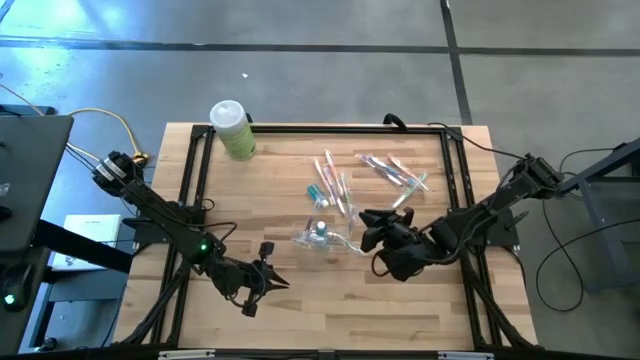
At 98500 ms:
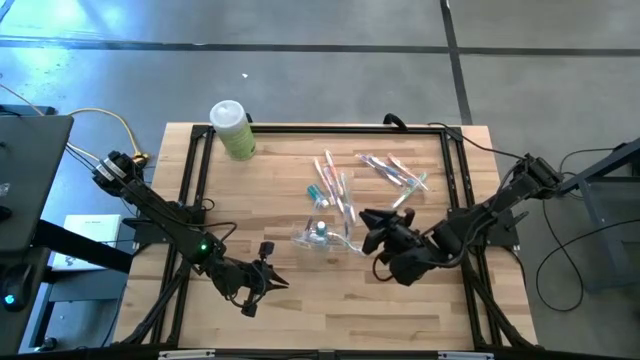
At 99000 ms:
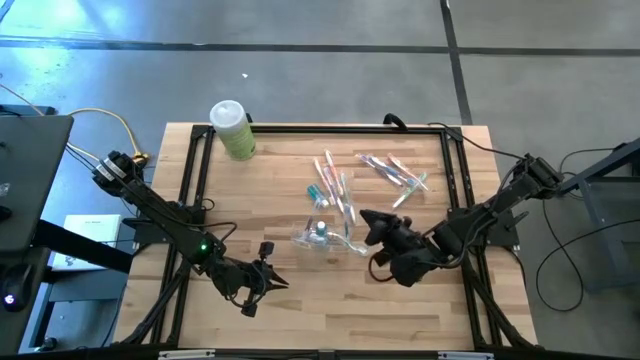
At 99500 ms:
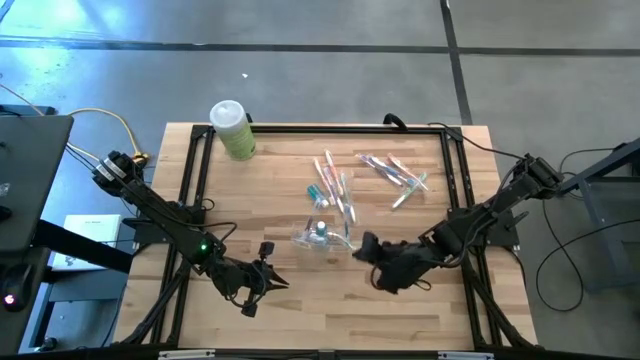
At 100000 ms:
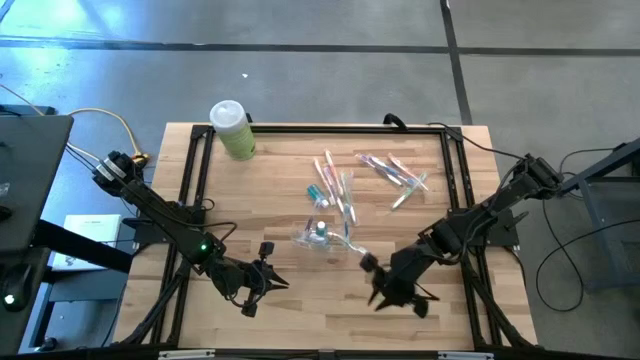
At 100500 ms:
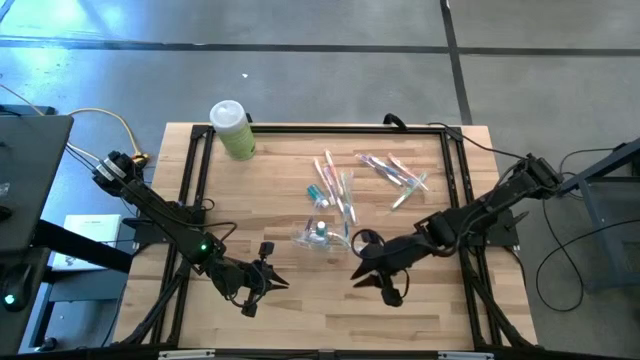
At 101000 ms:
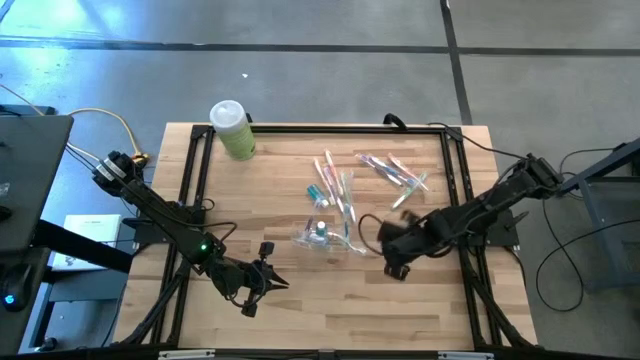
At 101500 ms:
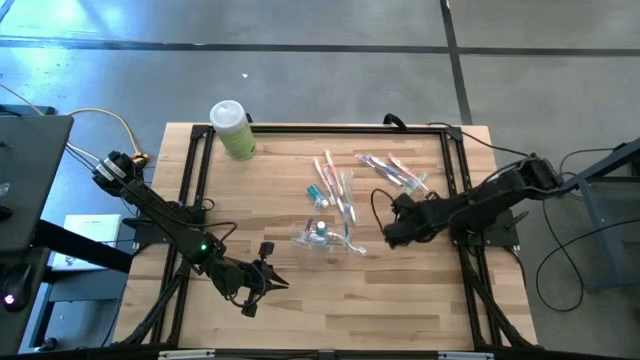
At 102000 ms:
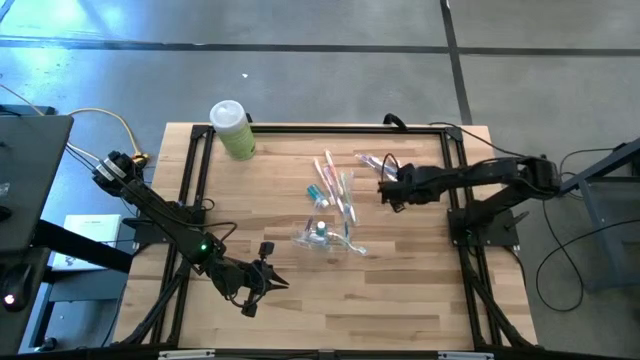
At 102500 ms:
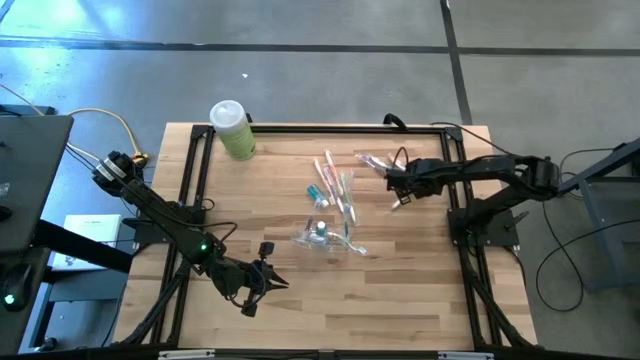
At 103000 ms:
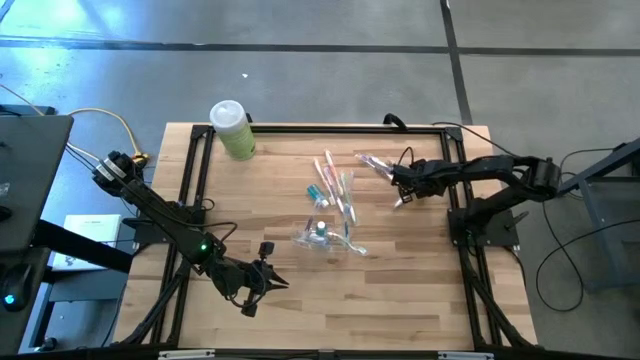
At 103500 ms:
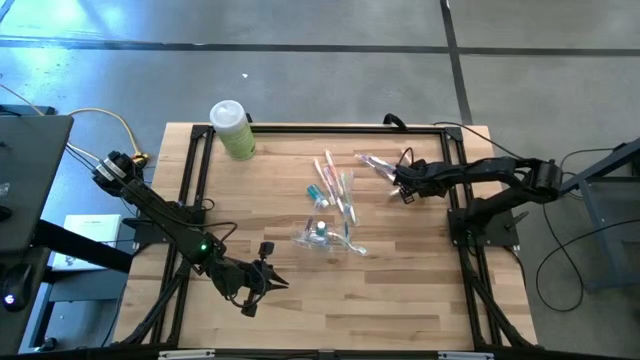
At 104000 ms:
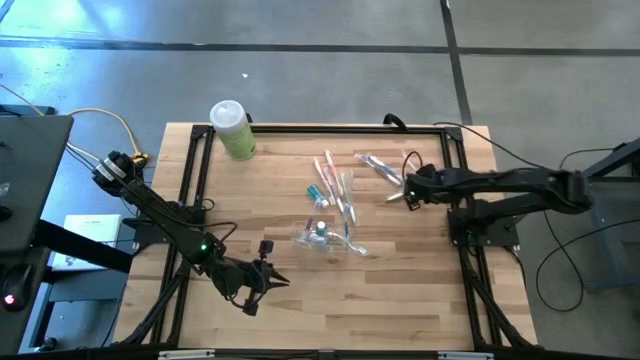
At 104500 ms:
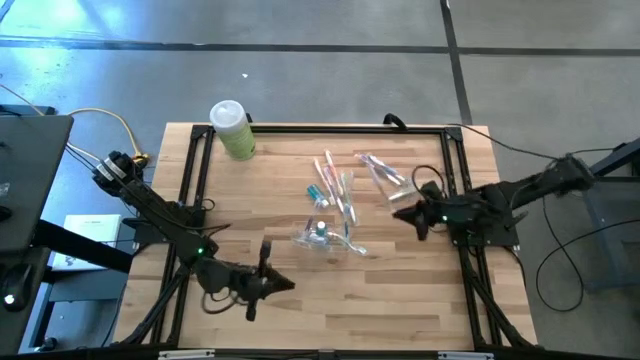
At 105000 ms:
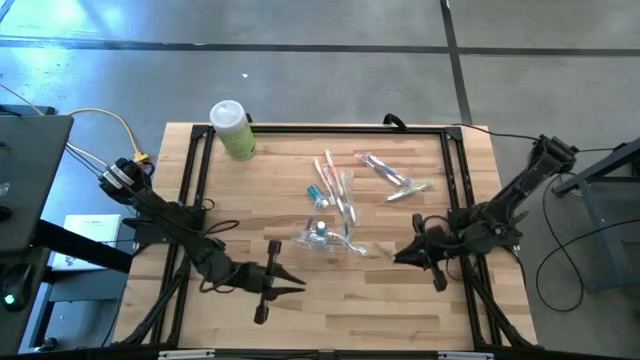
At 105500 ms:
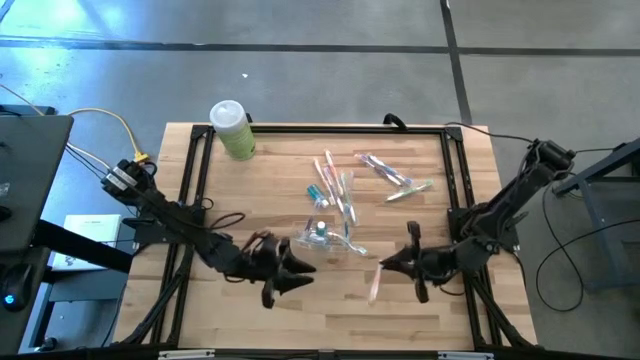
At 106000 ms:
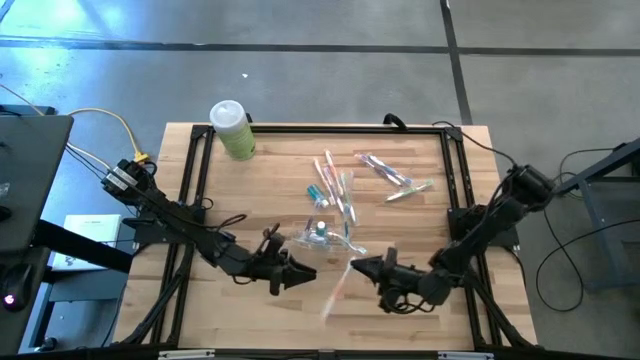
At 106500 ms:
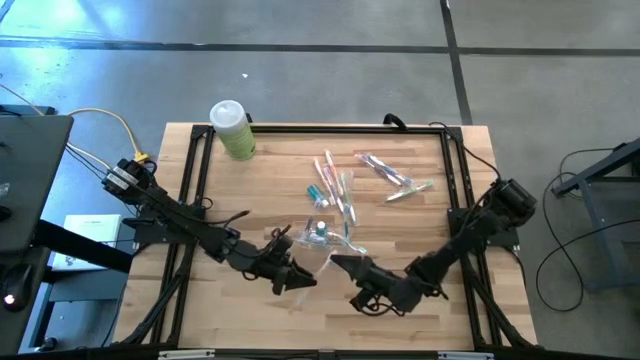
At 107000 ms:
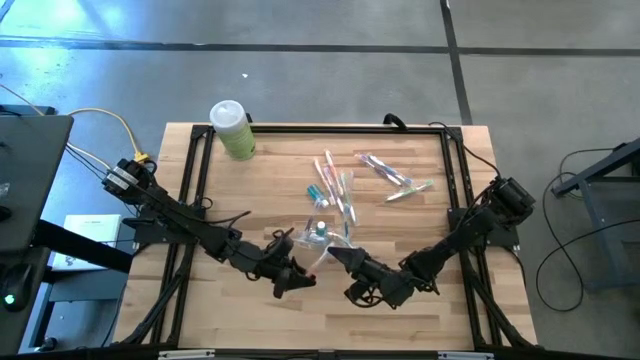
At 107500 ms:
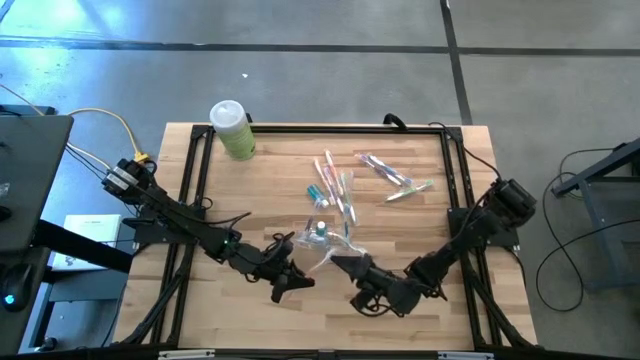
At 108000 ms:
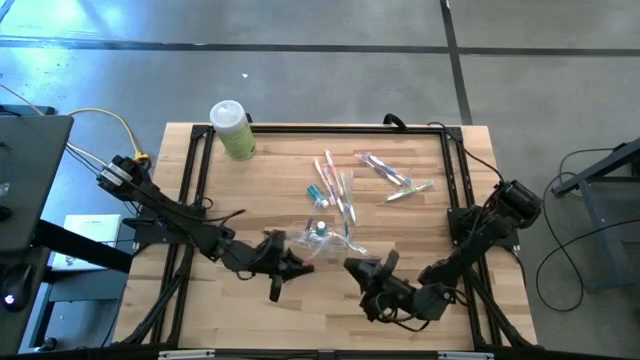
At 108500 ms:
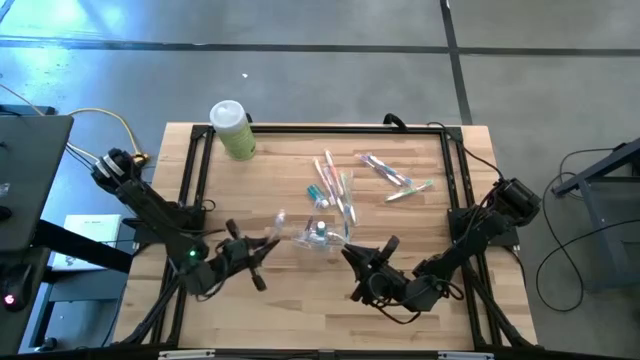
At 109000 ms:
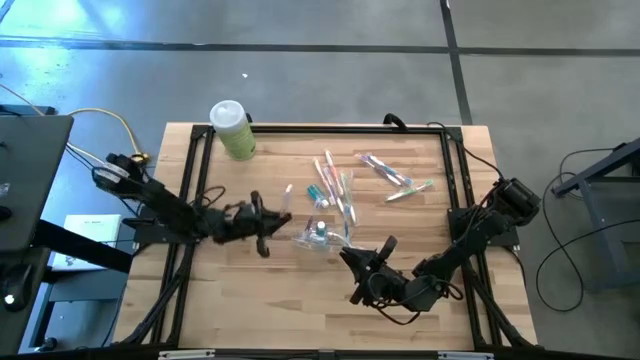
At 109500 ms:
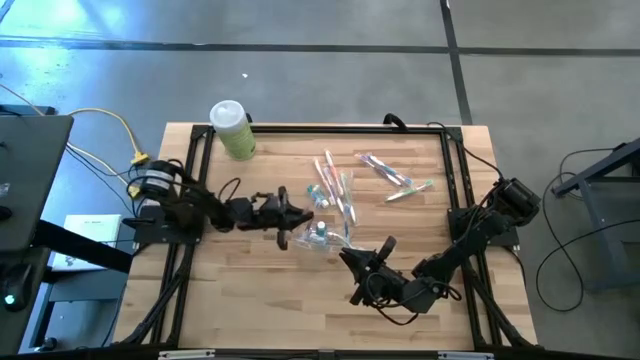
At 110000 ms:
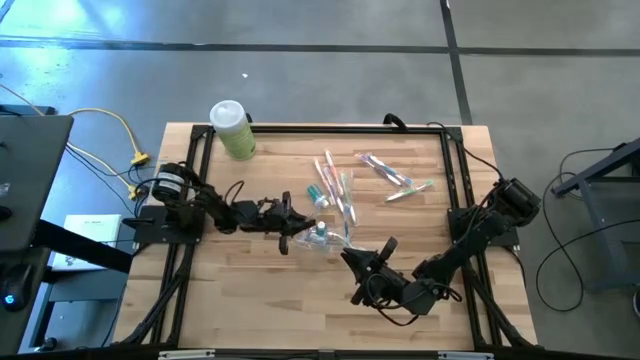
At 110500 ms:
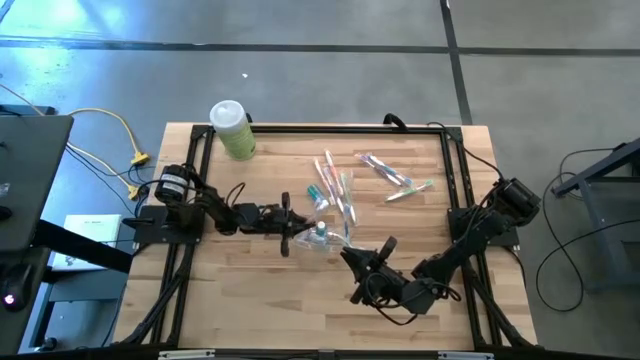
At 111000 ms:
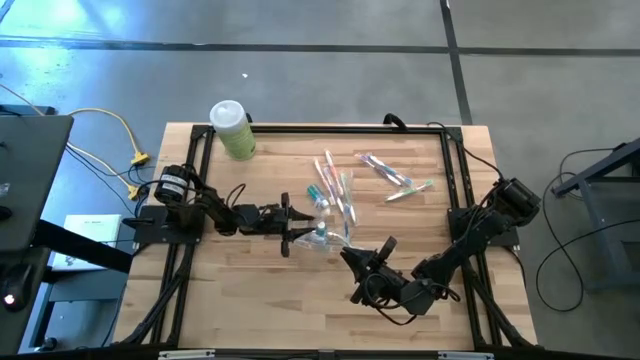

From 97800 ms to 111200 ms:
Task: Pick & Place toothbrushing station
Put the orange toothbrush into the transparent organizer

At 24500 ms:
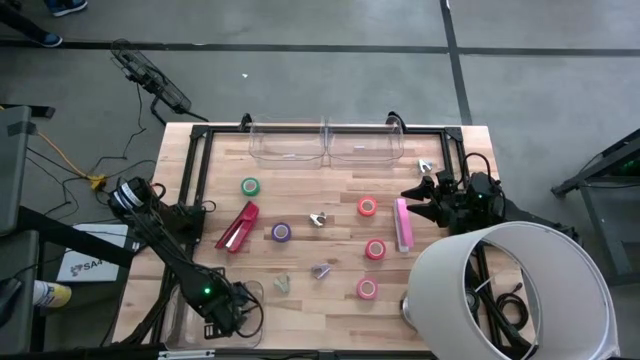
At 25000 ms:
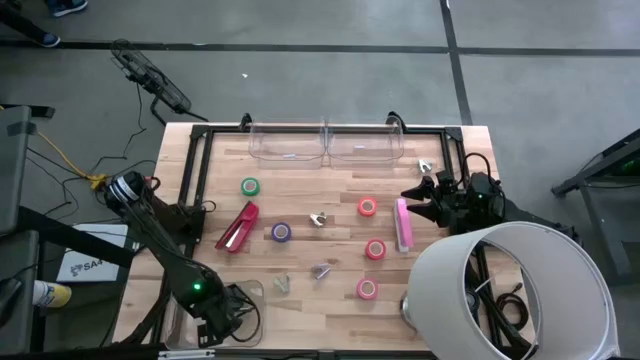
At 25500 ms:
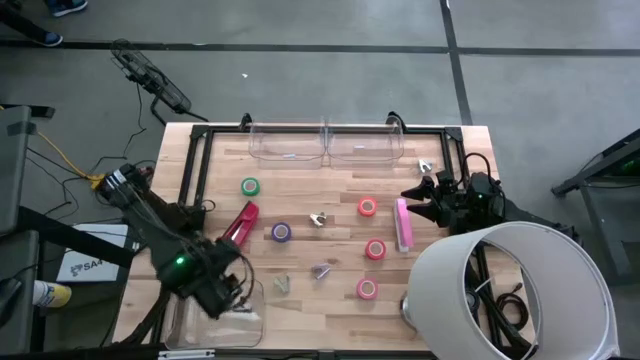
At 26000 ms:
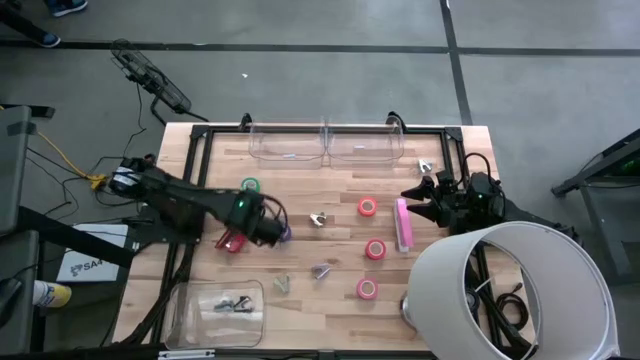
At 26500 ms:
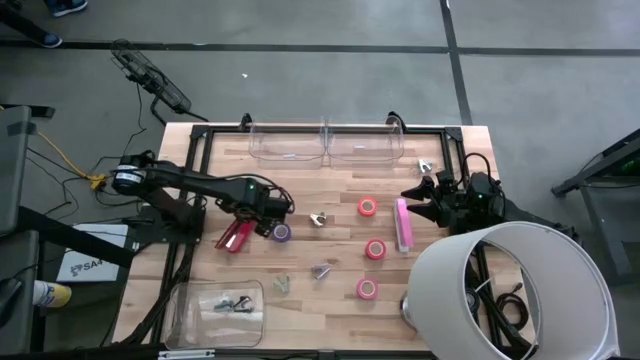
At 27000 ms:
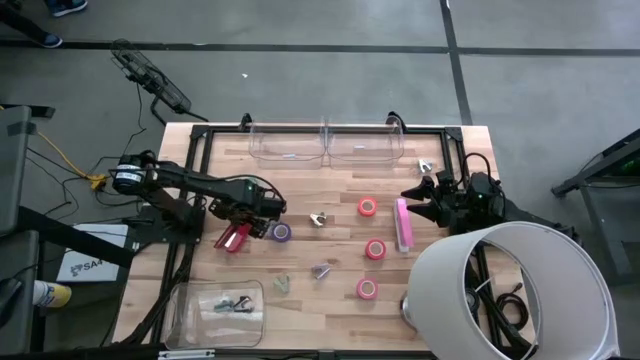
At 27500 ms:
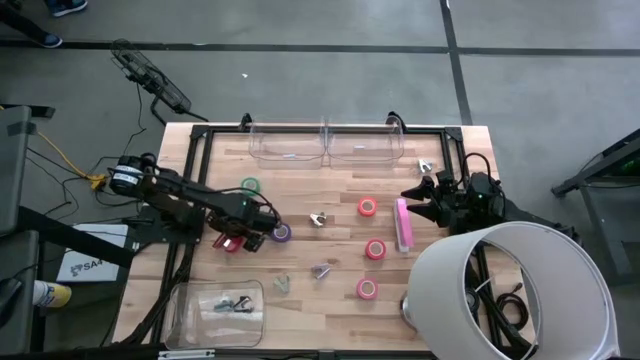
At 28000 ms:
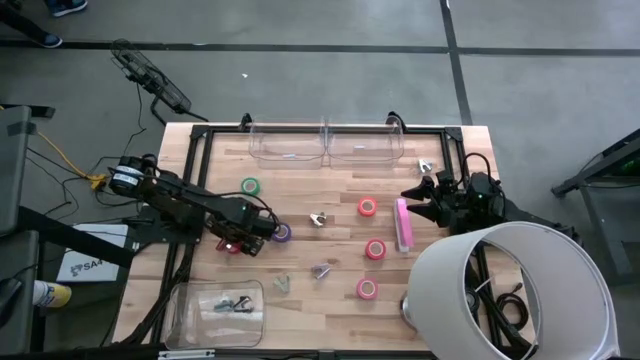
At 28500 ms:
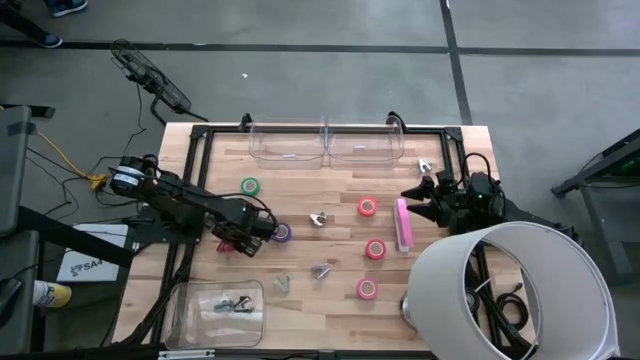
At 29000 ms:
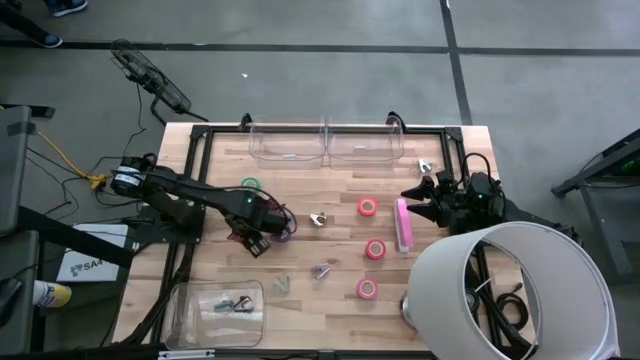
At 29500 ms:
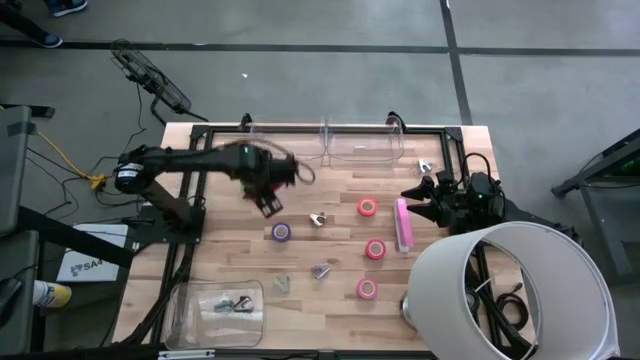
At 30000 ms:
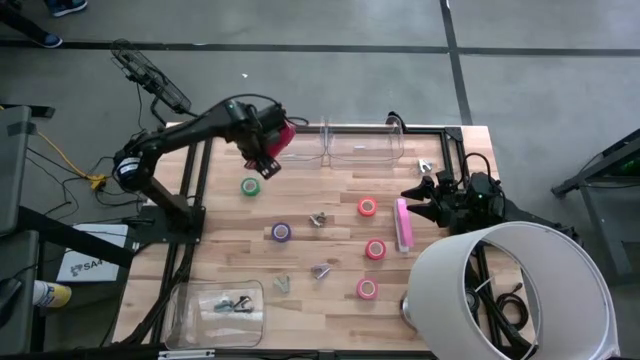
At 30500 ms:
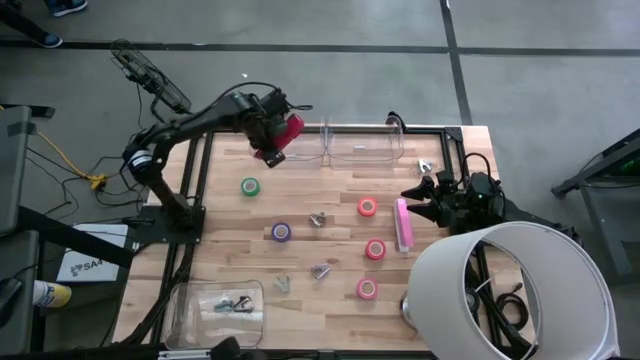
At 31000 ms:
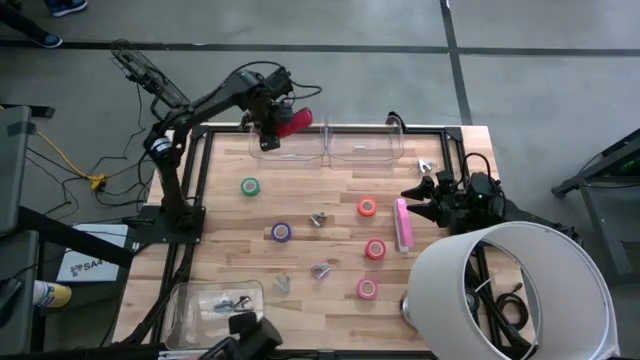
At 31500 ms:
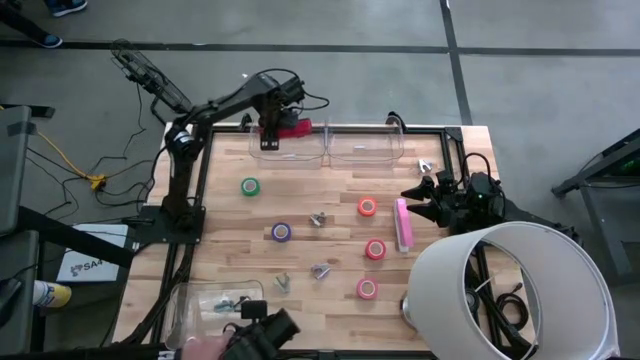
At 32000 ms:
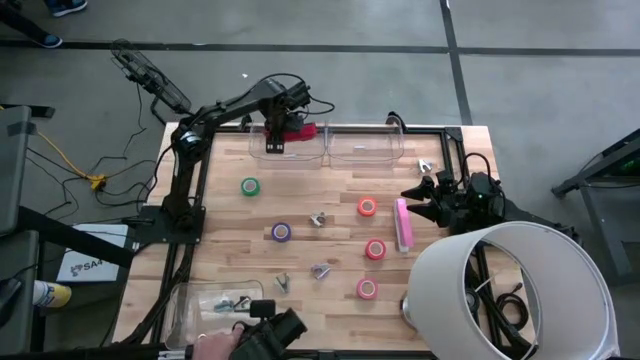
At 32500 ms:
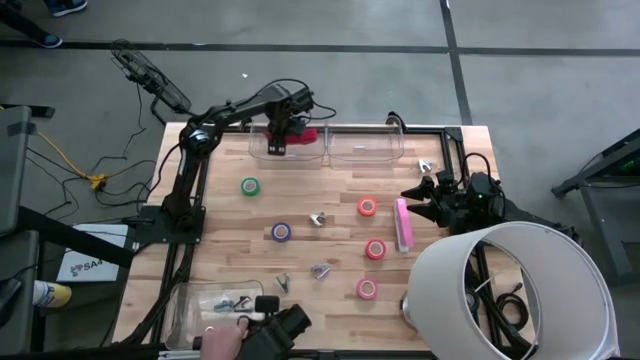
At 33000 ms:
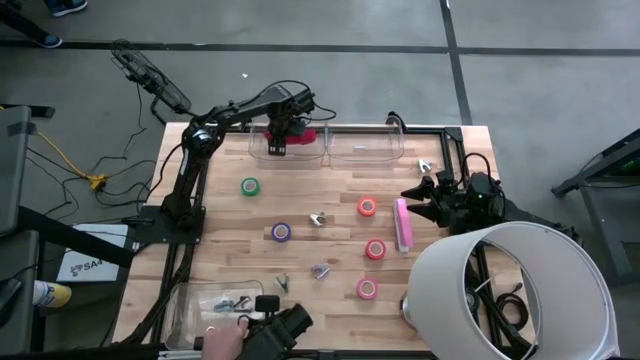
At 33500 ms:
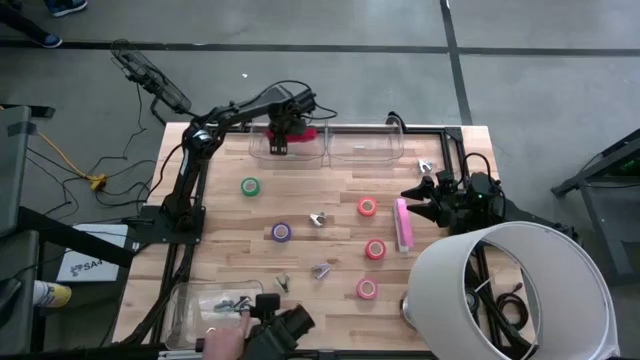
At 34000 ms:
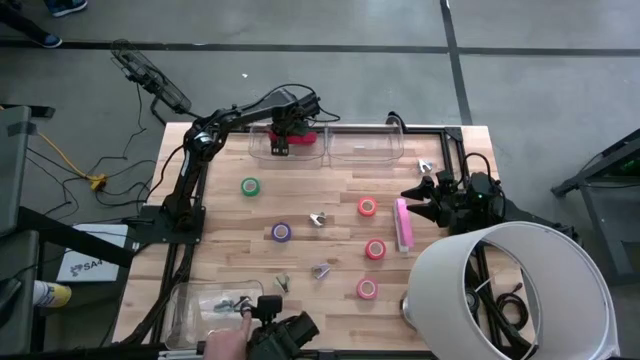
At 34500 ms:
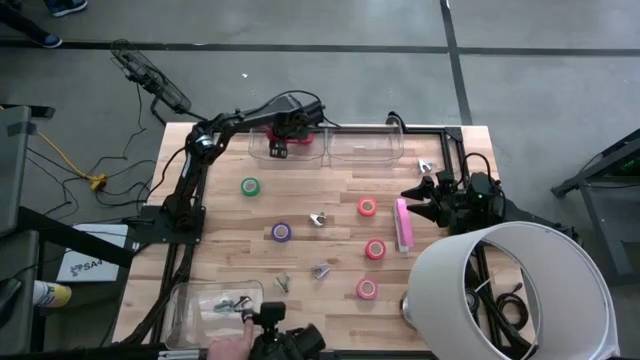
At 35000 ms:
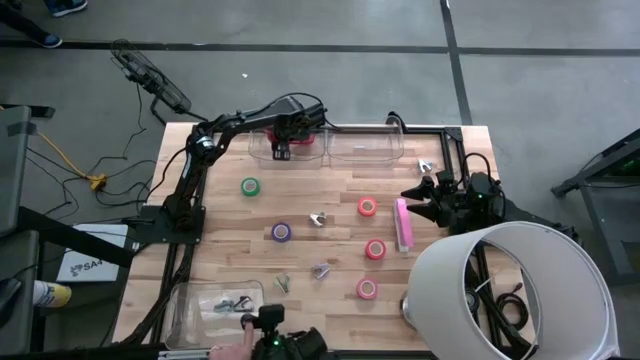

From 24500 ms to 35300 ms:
Task: Pick and place Stapler, Stapler remover, tape
Put the red stapler into the top left transparent bin
